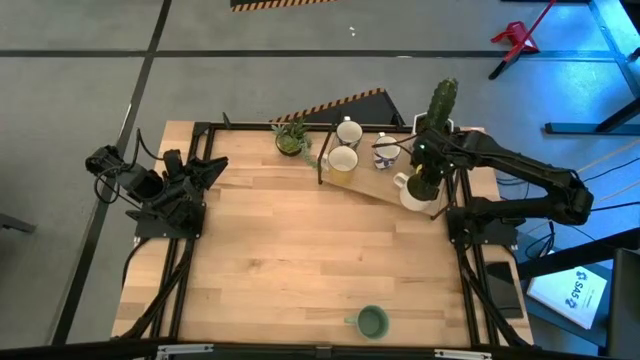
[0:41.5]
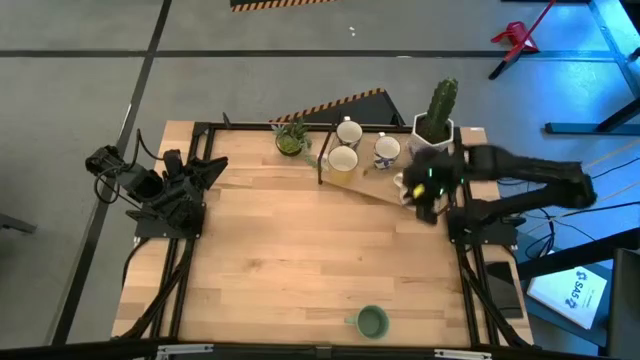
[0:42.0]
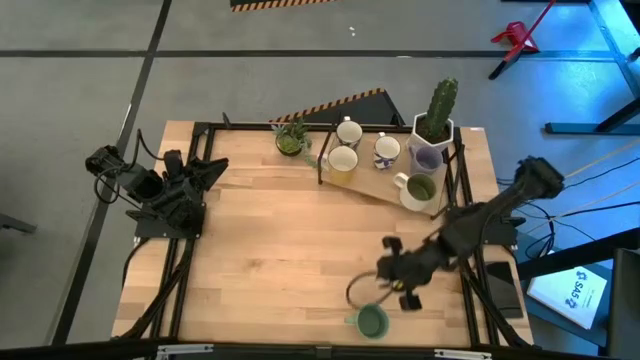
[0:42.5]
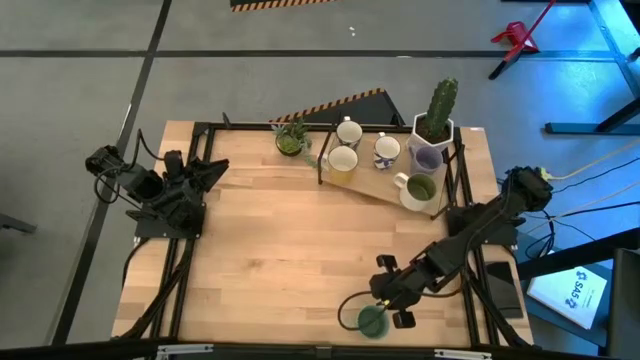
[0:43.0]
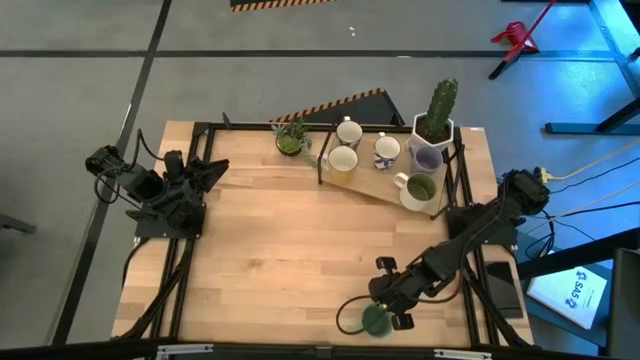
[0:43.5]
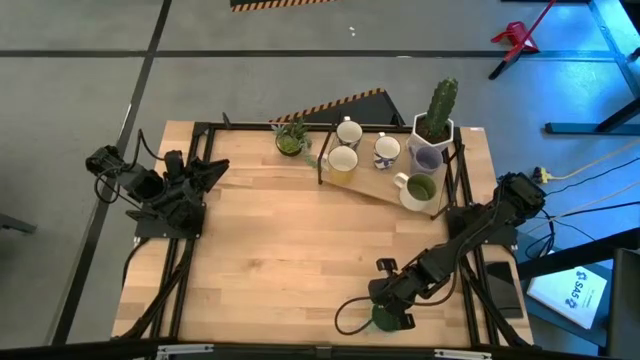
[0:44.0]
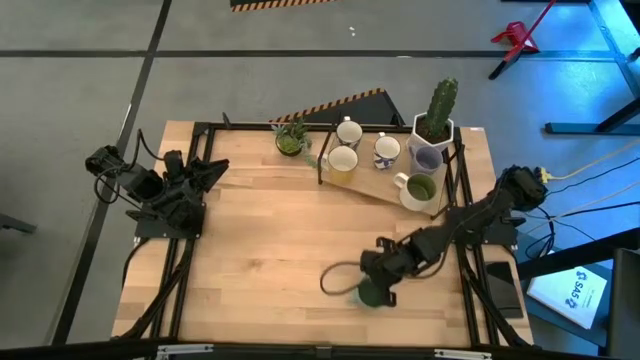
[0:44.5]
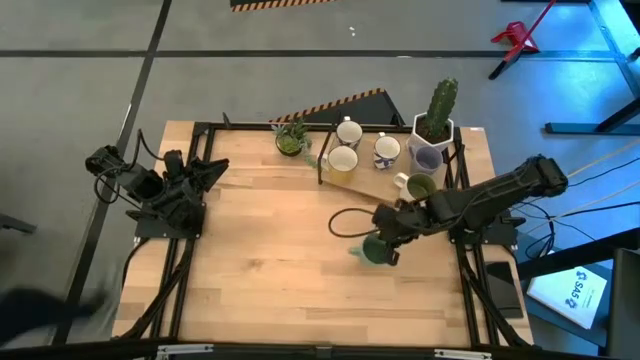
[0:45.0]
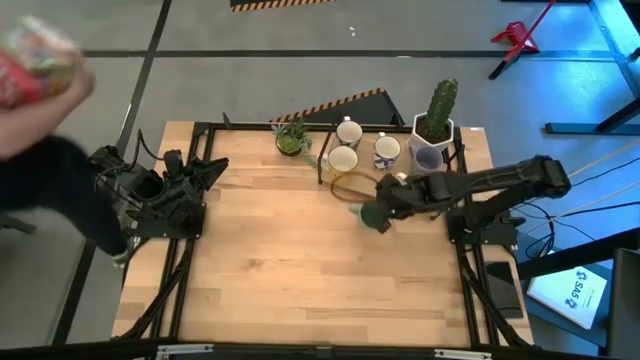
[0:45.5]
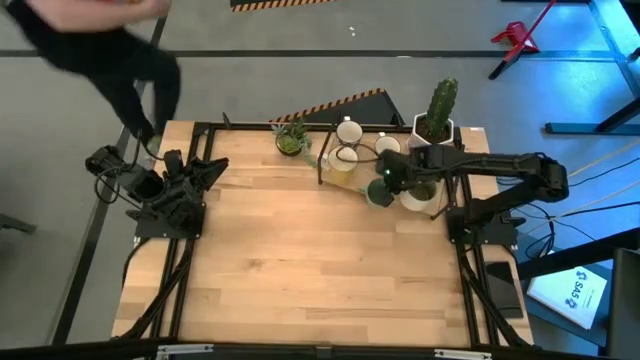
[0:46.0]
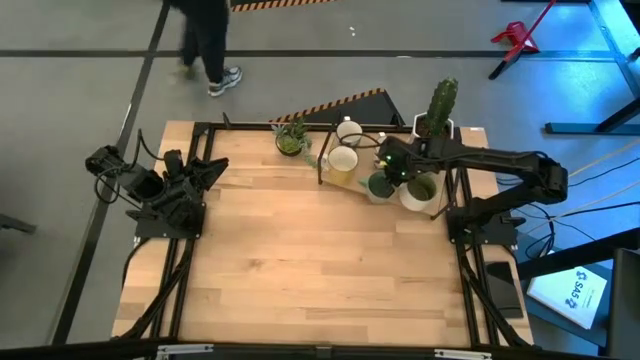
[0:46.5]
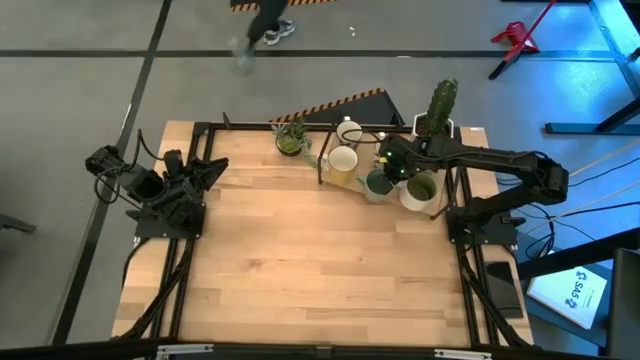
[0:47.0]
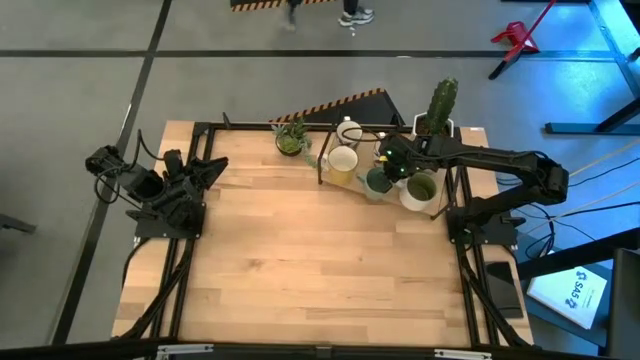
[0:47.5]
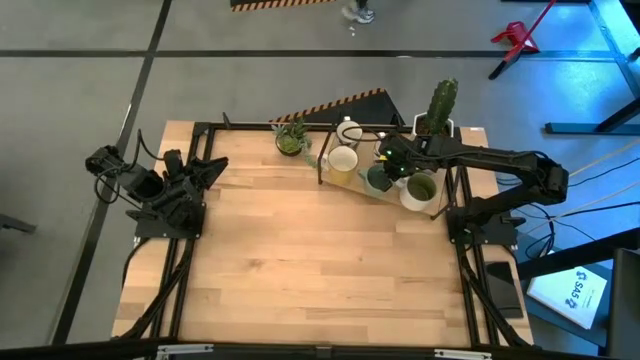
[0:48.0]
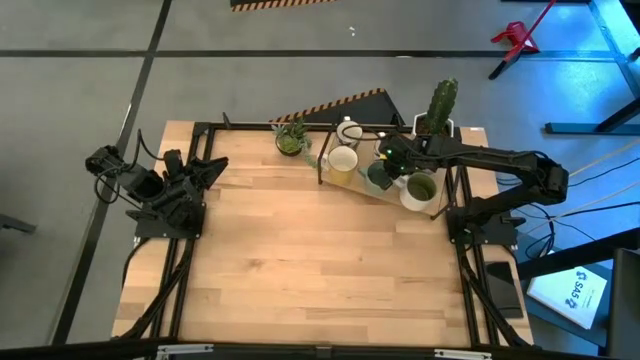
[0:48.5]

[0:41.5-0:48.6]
Task: Place coffee mugs
Put the green mug on the shelf

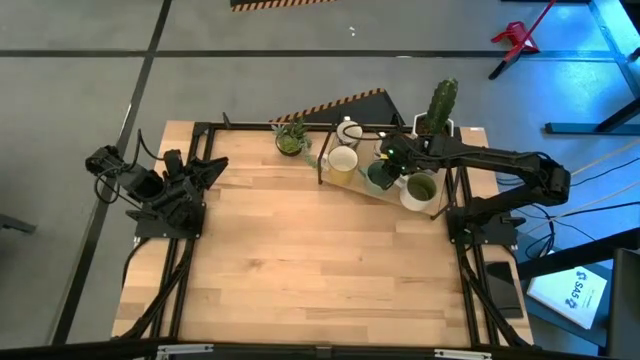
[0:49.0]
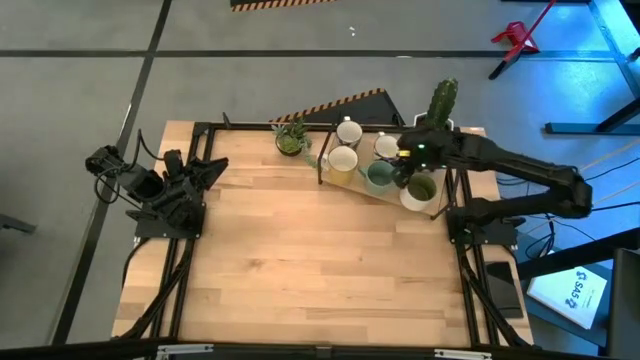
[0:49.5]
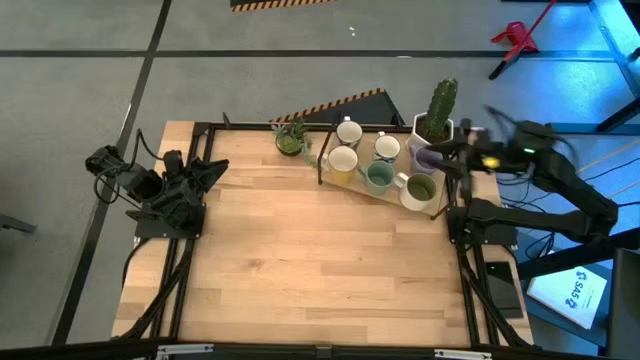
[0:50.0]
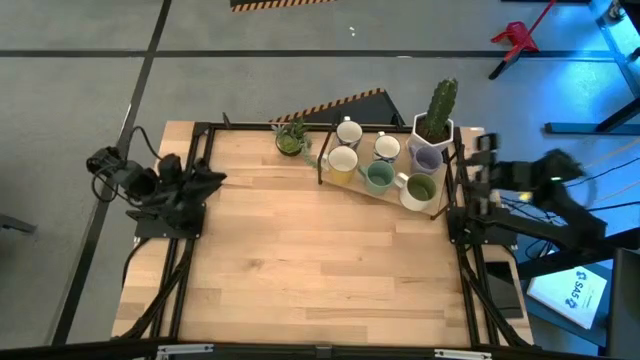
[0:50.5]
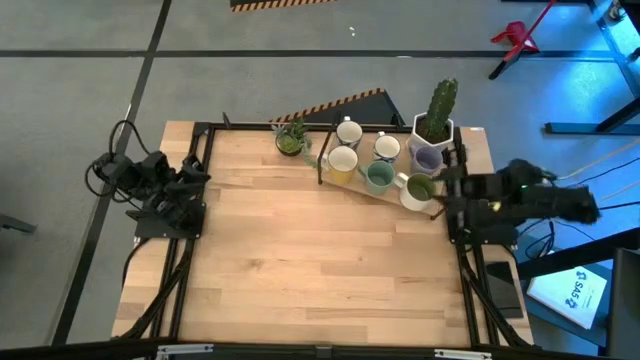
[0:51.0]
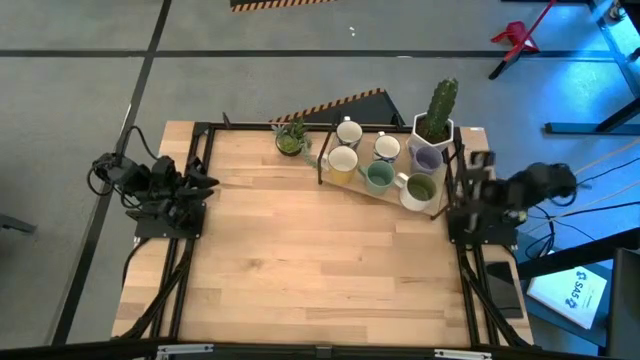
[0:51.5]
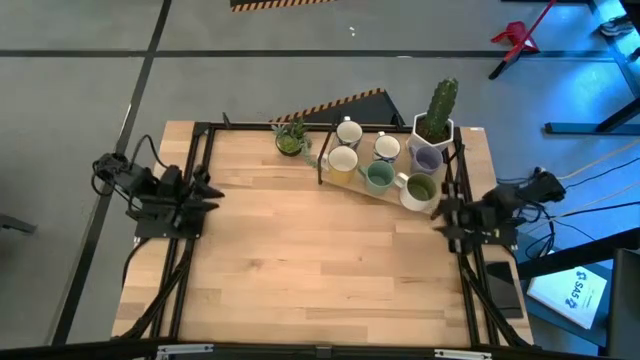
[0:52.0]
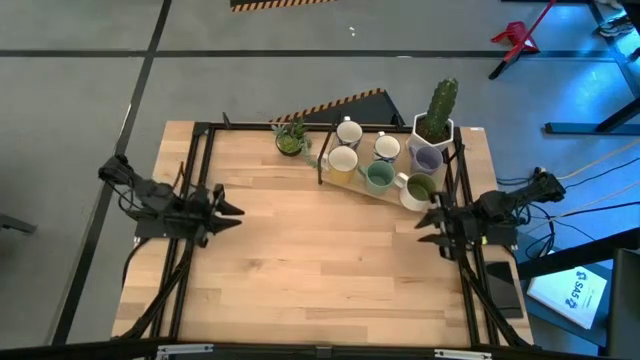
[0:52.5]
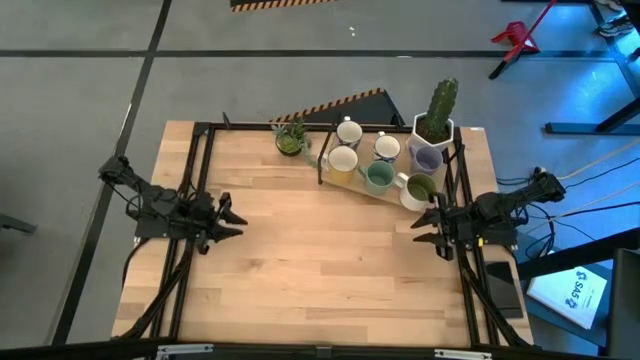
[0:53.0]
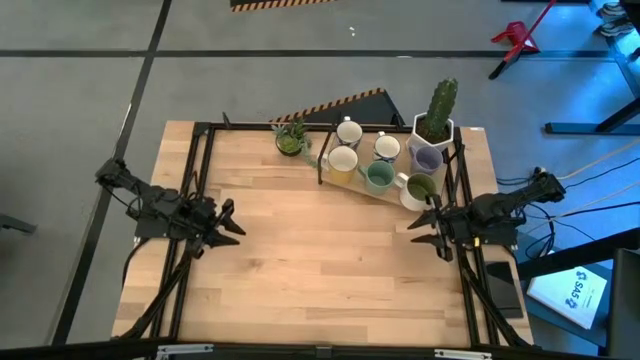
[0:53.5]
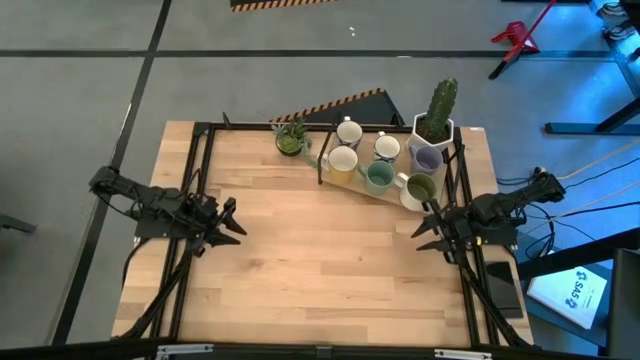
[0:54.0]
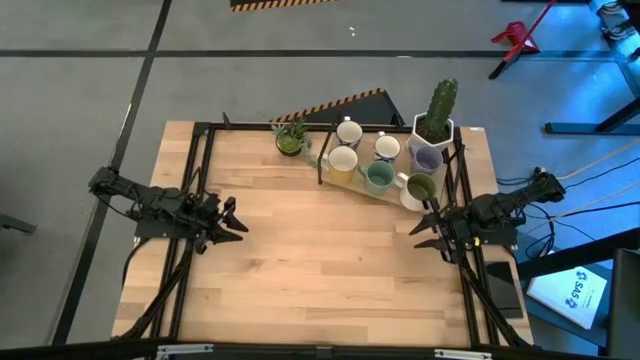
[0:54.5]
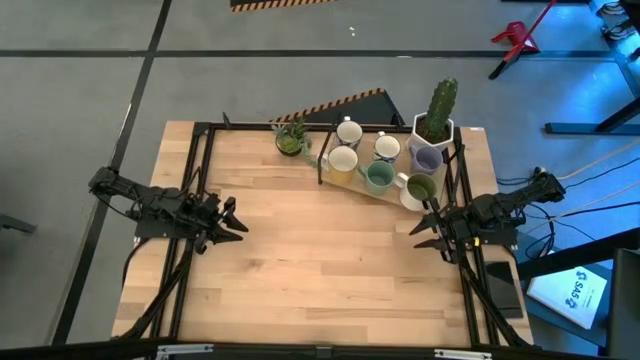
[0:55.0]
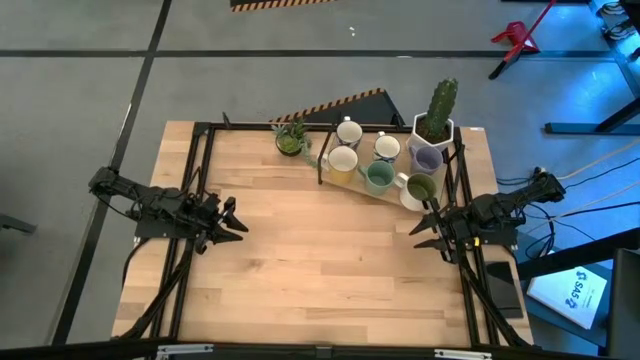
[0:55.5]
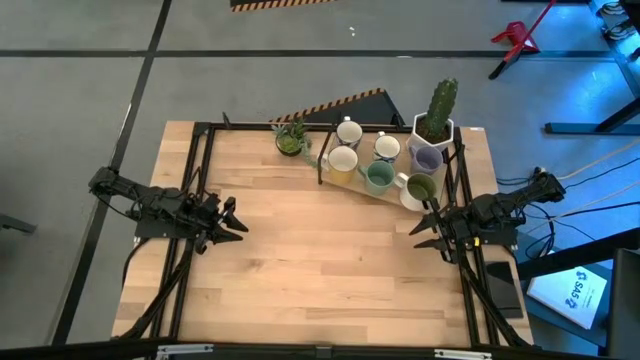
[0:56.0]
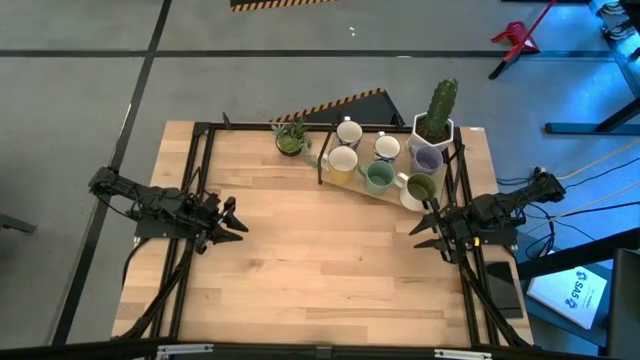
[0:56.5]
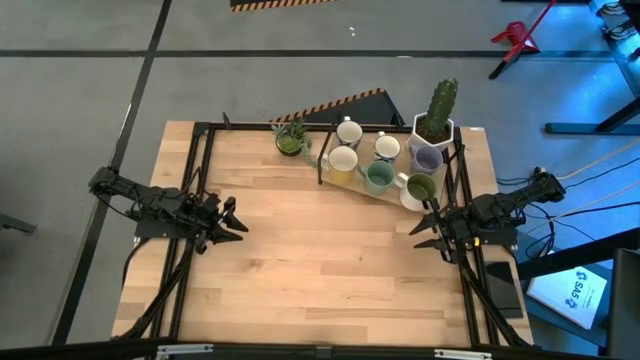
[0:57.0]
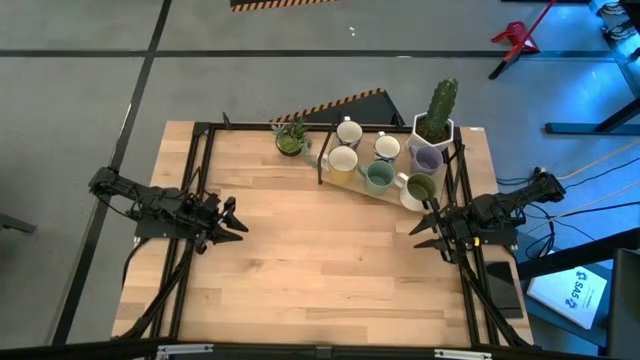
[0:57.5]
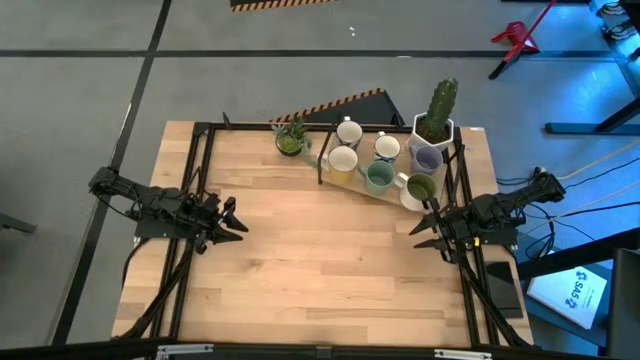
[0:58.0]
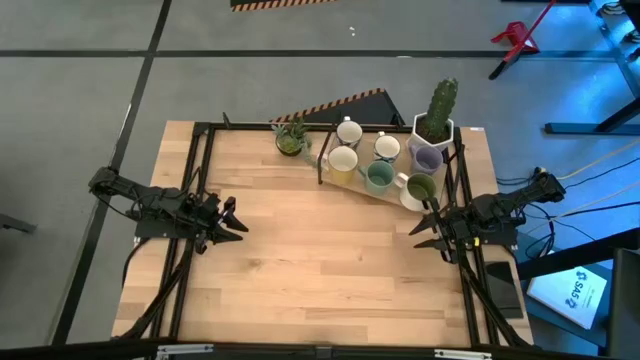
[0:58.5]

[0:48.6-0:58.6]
Return to Home Position

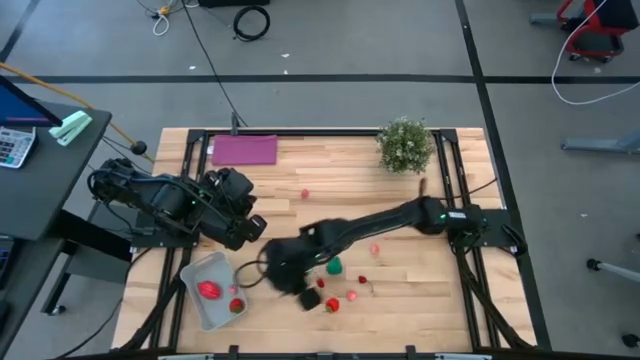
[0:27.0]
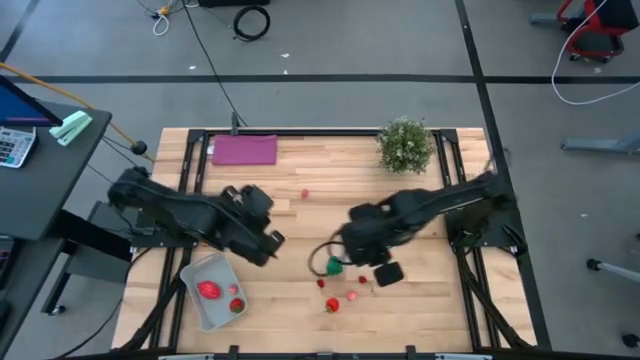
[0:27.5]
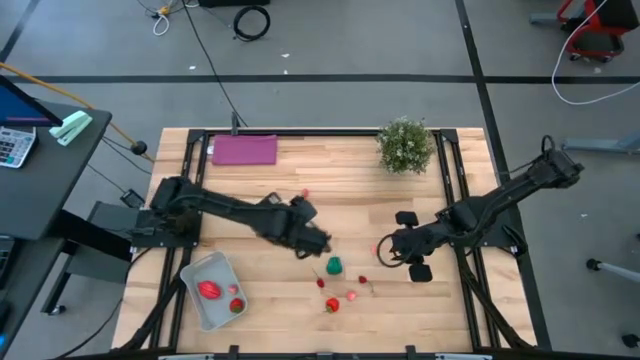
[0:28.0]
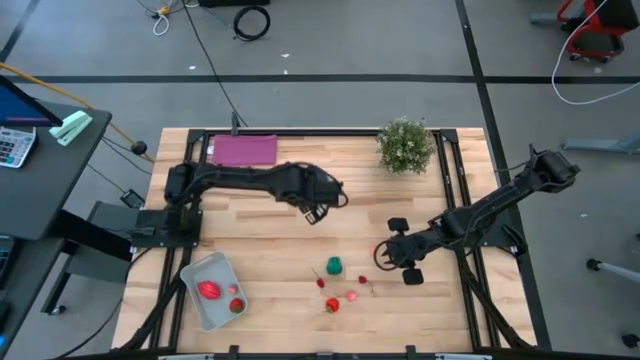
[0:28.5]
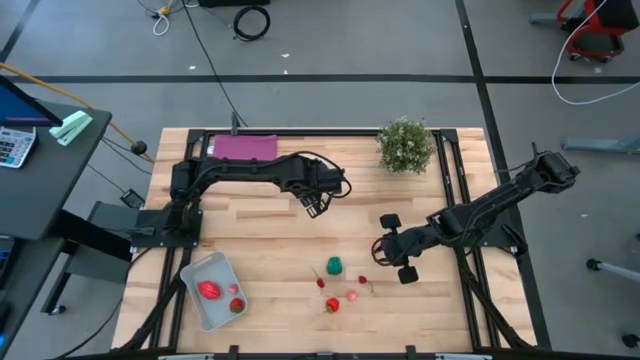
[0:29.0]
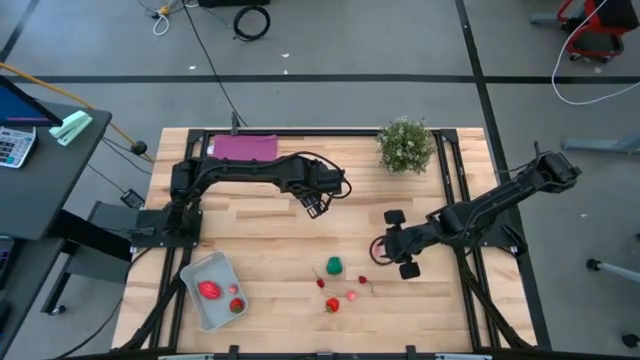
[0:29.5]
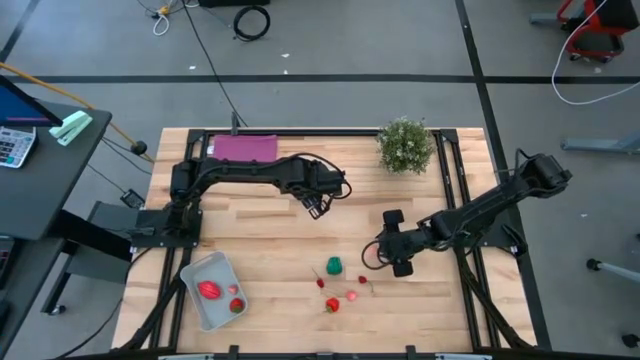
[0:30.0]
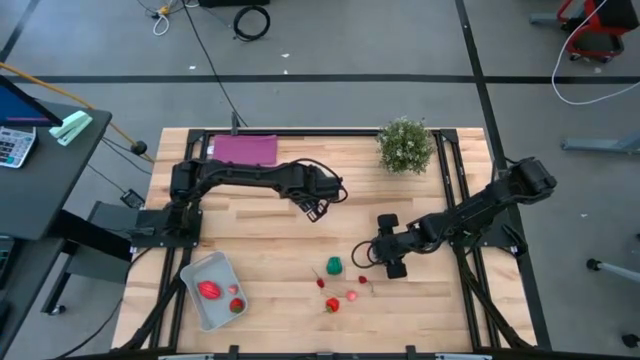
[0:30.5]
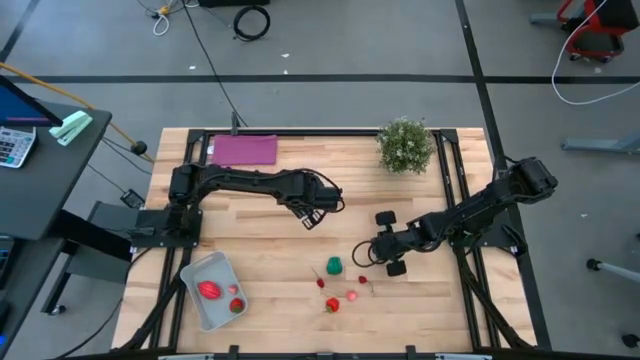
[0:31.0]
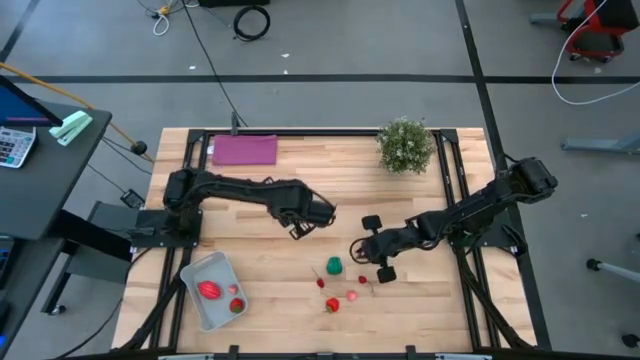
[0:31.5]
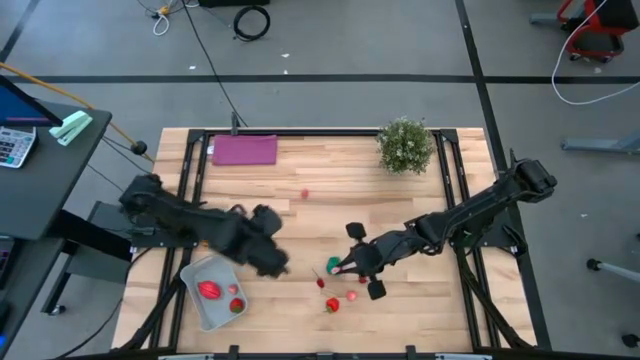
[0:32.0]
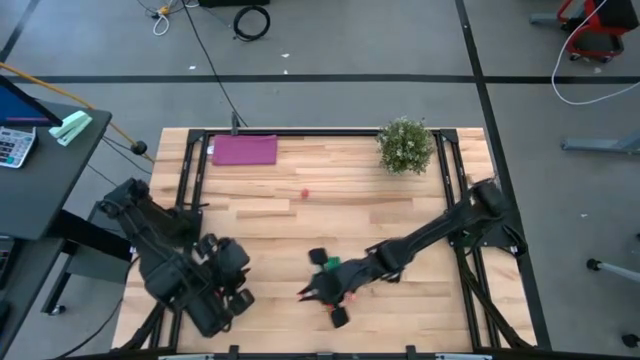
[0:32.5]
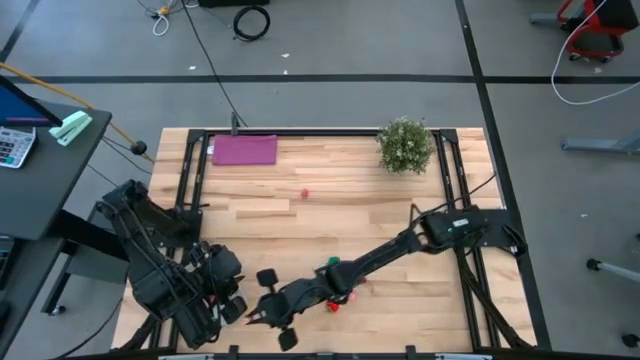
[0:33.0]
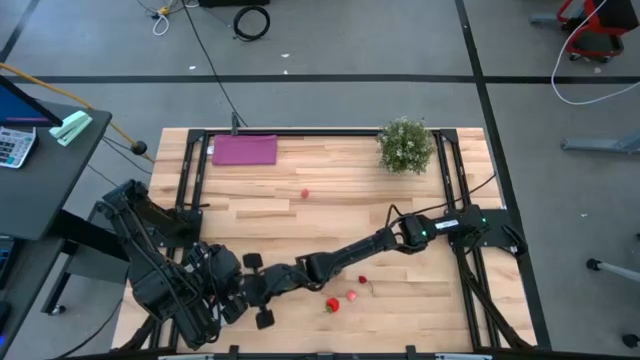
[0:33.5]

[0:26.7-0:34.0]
Task: Pick and placing Produce into tupperware
Put the pink peach into the gray bin
